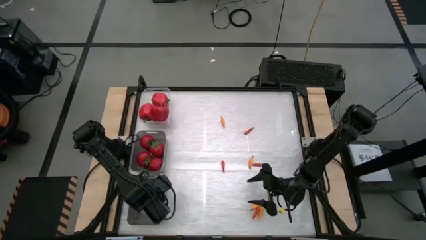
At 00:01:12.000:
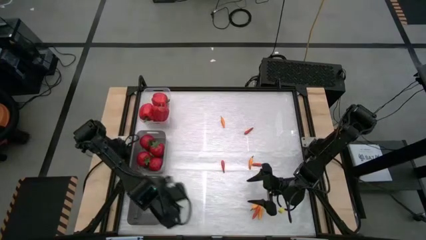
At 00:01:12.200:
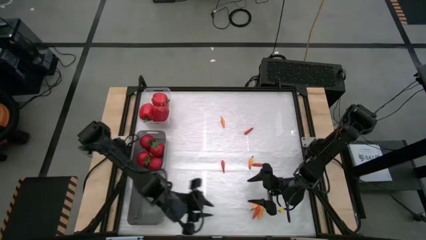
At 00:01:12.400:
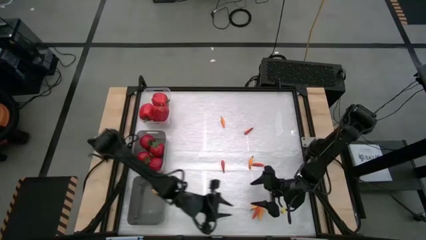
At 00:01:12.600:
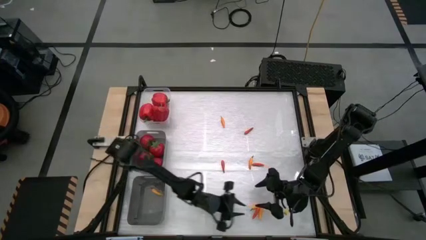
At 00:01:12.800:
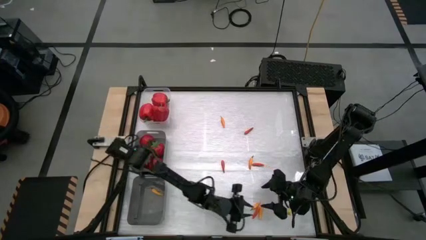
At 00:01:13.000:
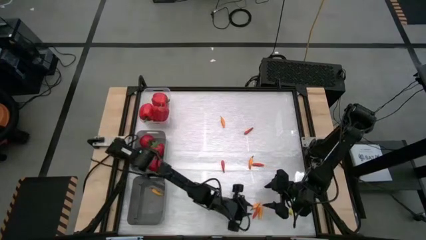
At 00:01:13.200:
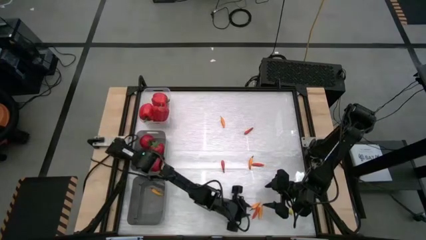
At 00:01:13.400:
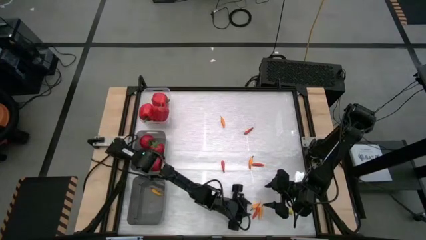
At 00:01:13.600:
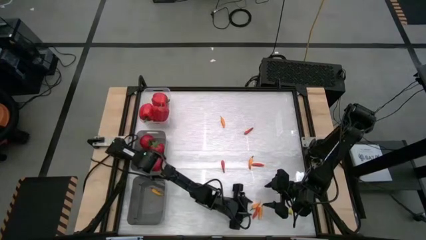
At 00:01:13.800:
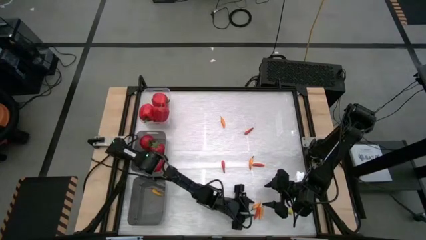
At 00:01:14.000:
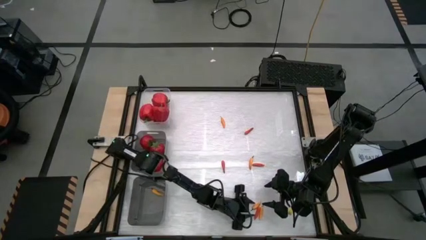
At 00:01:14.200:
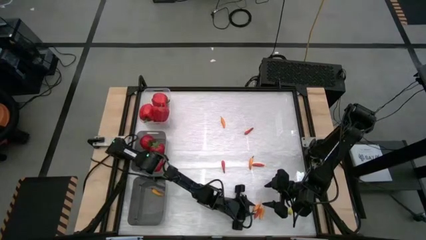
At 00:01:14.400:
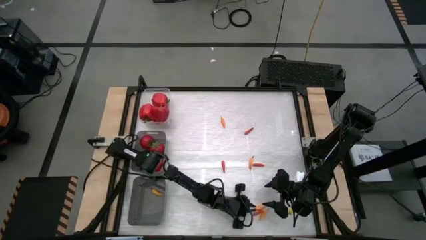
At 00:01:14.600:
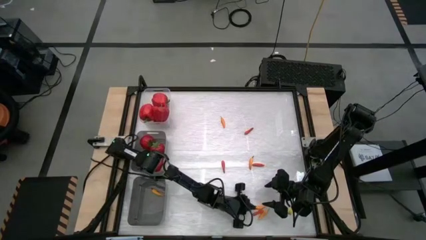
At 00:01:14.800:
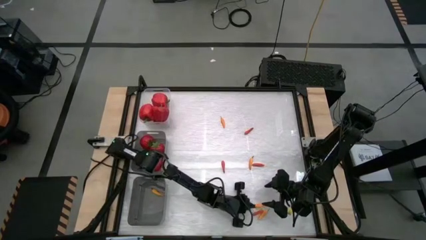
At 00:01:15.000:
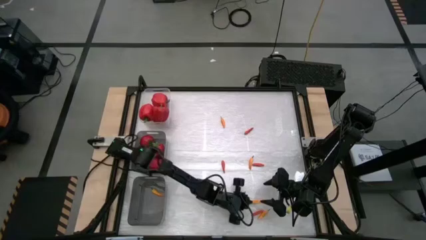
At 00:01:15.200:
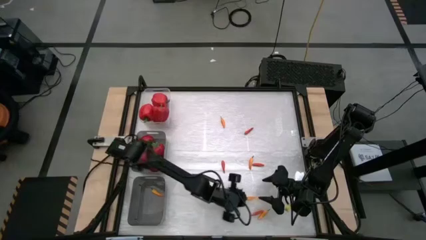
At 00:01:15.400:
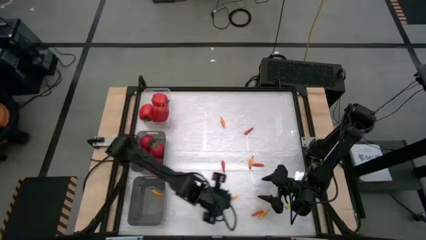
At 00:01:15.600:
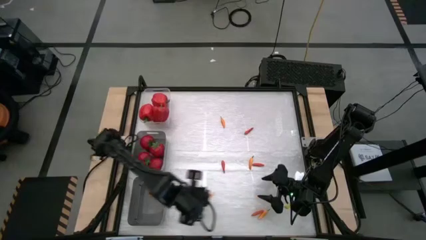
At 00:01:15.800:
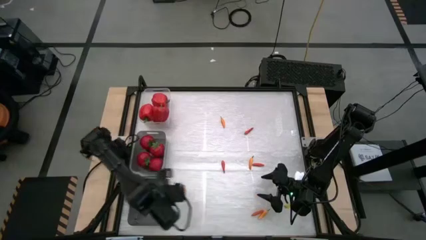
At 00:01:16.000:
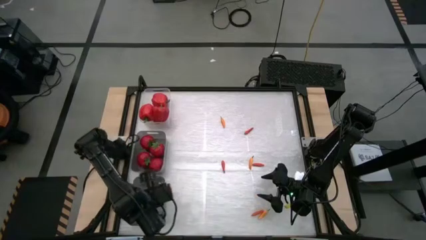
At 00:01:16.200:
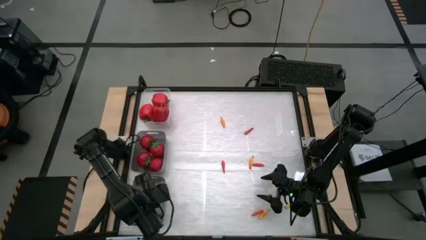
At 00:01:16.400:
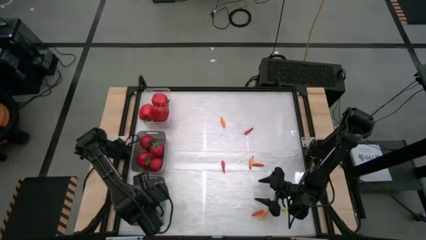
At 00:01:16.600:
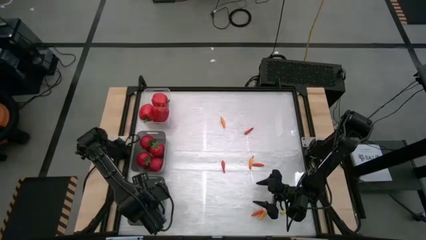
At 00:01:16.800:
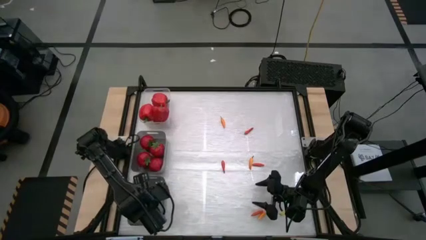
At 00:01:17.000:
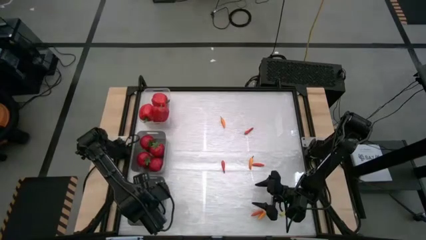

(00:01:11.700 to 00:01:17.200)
Task: Sort produce into baskets
Put the bottom right orange chili pepper into the bottom black transparent bin

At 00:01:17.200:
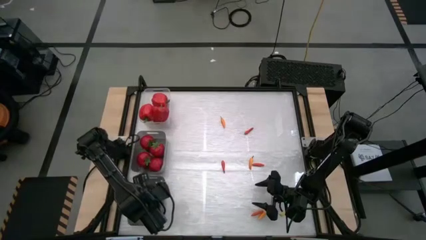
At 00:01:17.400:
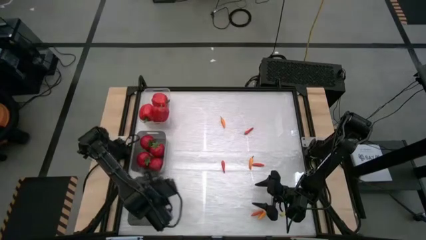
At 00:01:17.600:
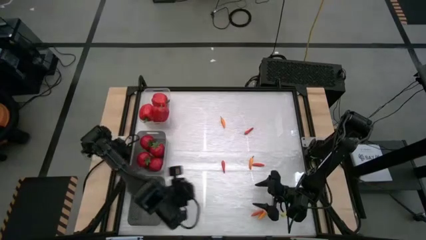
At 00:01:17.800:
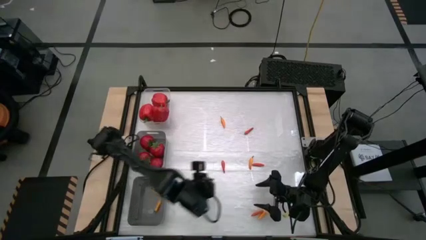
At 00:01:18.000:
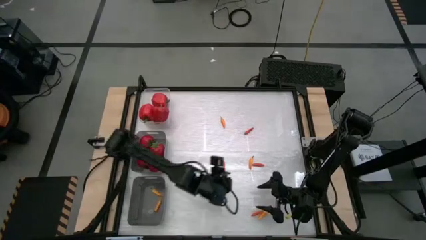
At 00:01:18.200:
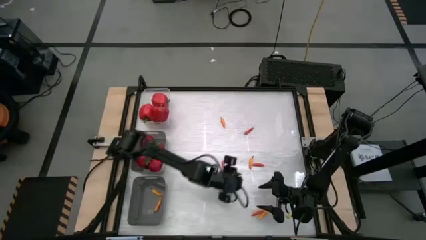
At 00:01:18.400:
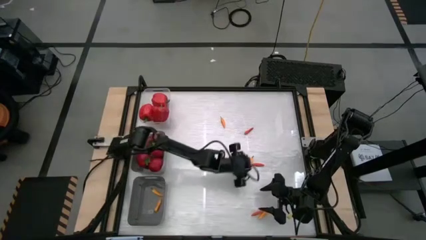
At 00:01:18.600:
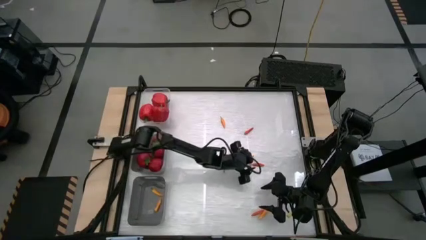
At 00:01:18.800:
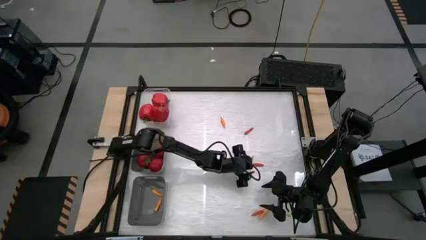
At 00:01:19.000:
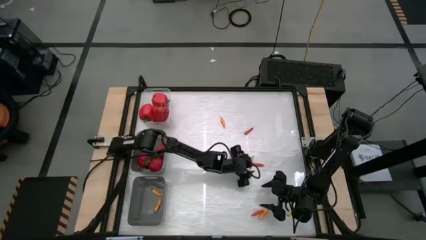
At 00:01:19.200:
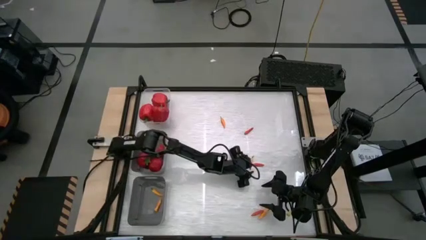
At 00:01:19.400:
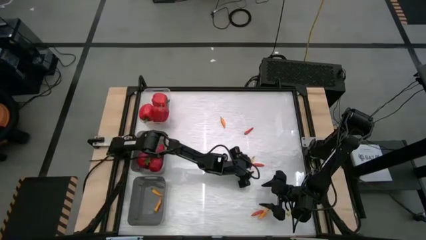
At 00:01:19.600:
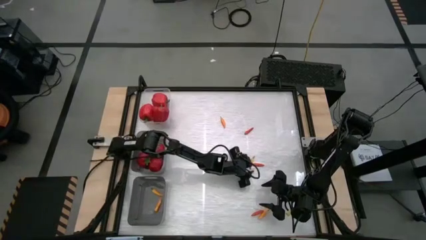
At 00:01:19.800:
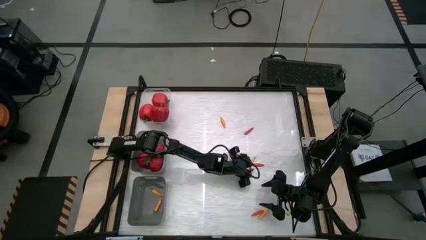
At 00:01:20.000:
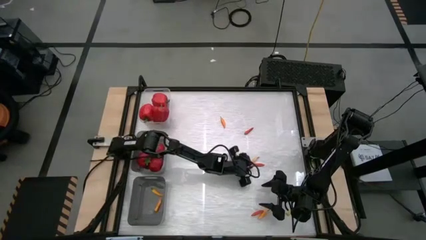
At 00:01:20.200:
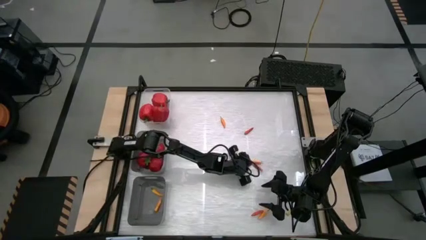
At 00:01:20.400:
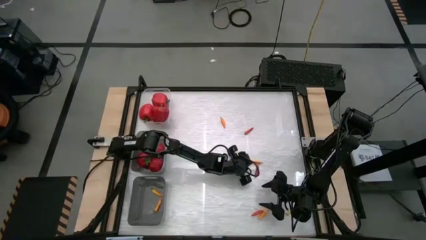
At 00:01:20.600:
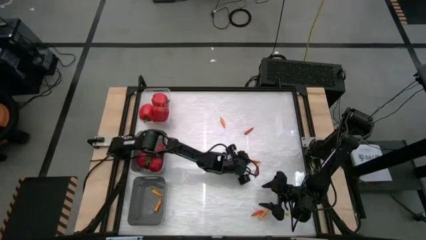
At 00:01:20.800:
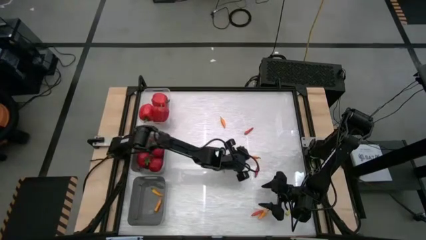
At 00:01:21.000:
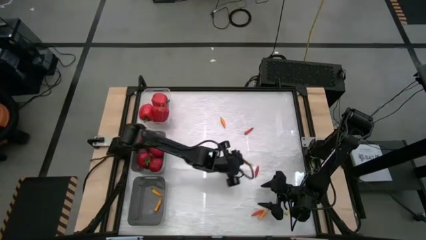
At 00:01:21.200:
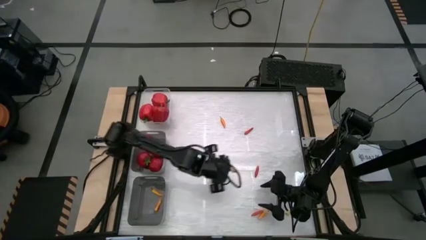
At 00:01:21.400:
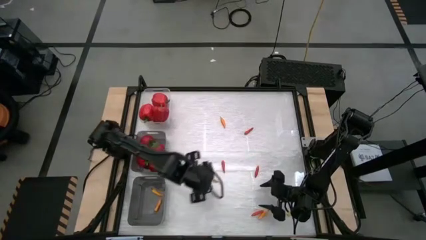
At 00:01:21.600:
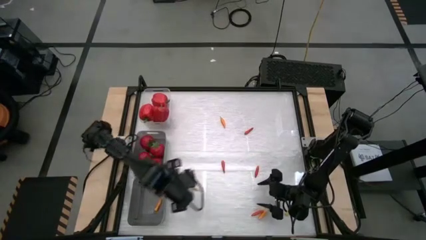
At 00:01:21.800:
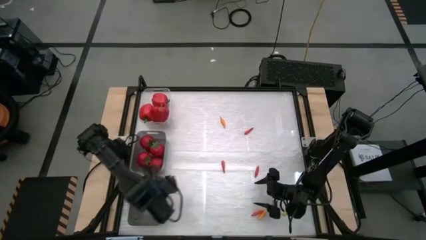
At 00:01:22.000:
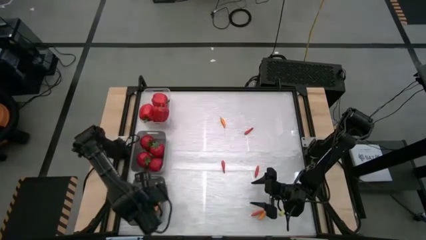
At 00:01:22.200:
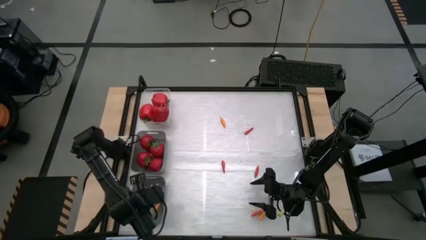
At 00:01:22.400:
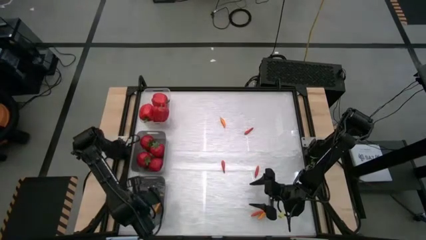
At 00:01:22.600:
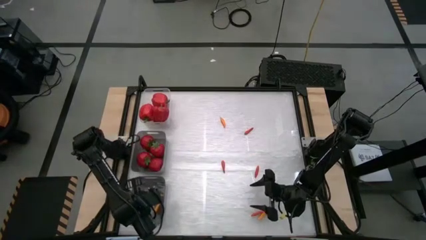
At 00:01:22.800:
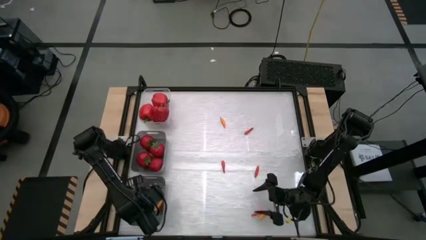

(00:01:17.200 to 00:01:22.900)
Put the middle right orange chili pepper into the bottom black transparent bin

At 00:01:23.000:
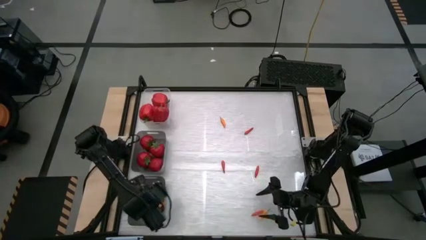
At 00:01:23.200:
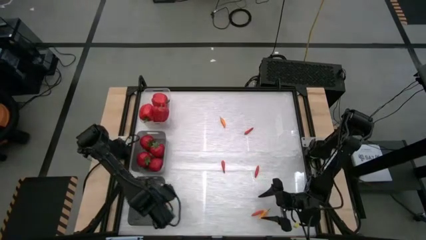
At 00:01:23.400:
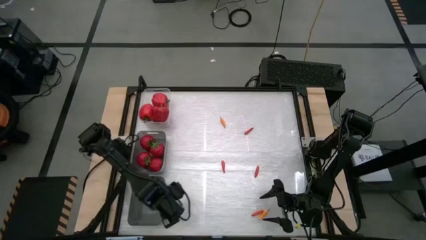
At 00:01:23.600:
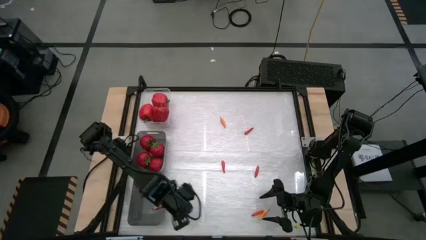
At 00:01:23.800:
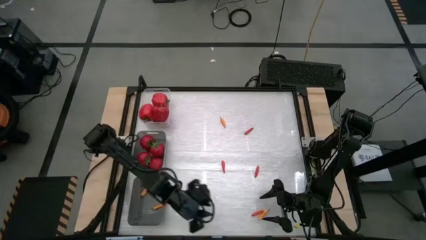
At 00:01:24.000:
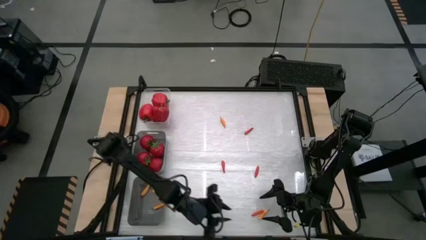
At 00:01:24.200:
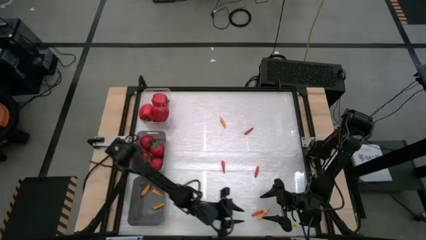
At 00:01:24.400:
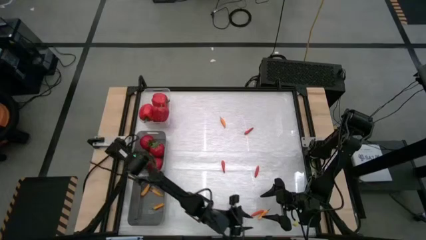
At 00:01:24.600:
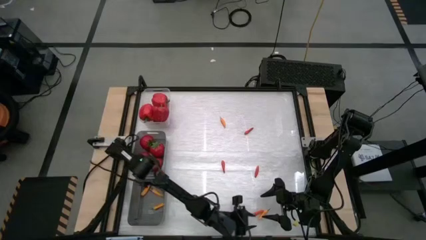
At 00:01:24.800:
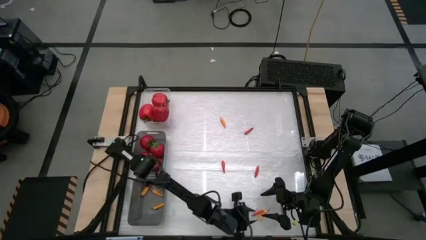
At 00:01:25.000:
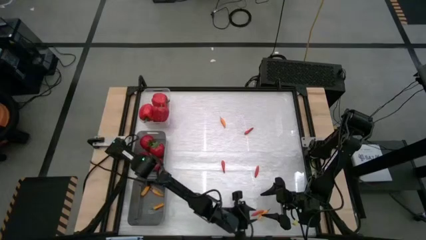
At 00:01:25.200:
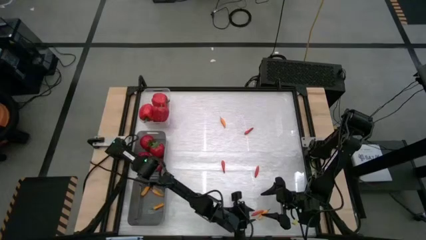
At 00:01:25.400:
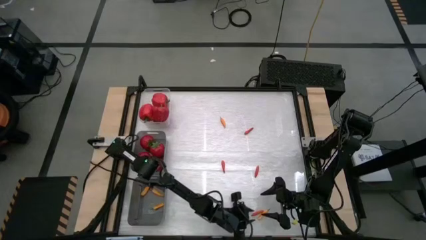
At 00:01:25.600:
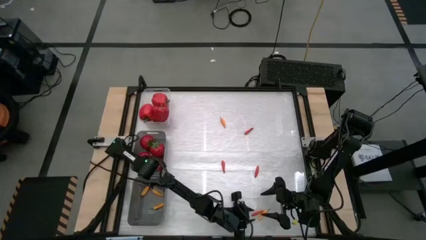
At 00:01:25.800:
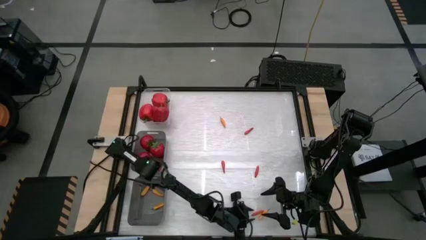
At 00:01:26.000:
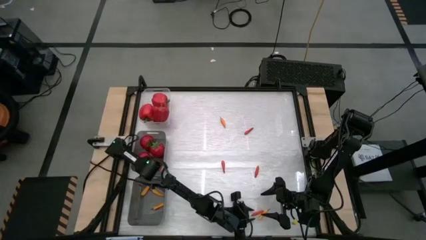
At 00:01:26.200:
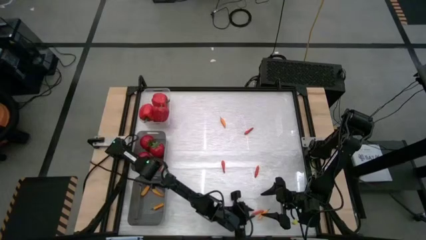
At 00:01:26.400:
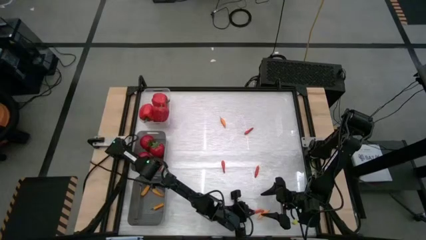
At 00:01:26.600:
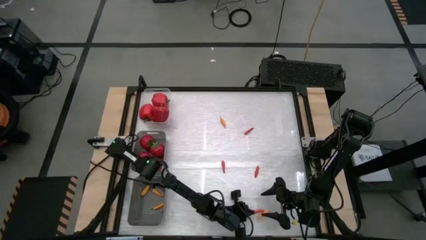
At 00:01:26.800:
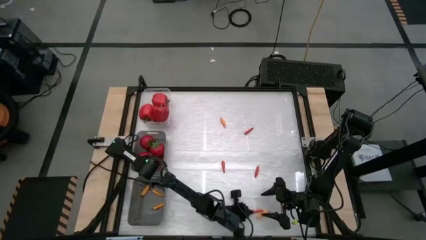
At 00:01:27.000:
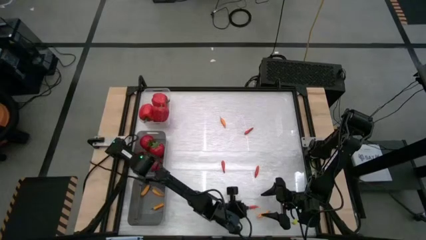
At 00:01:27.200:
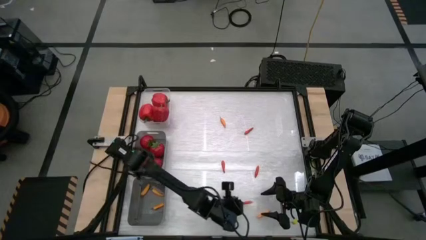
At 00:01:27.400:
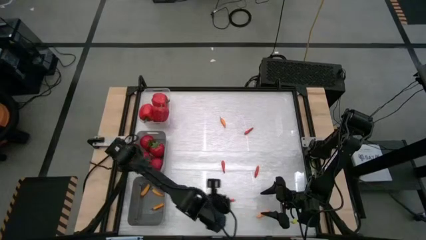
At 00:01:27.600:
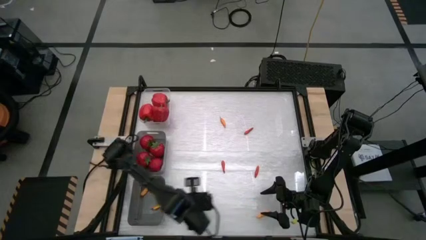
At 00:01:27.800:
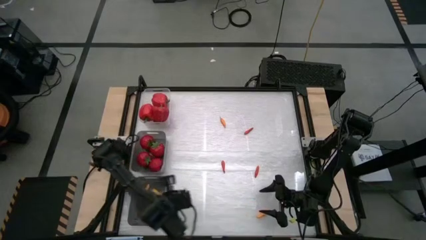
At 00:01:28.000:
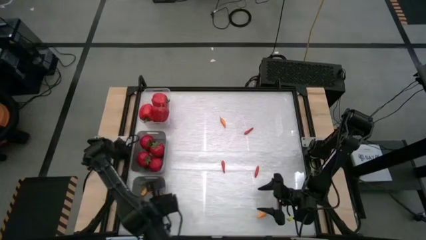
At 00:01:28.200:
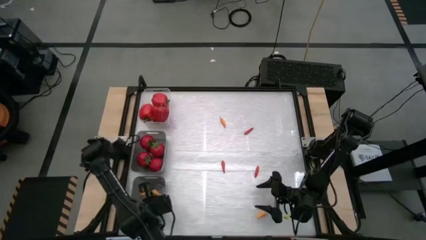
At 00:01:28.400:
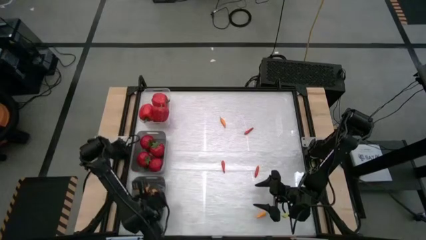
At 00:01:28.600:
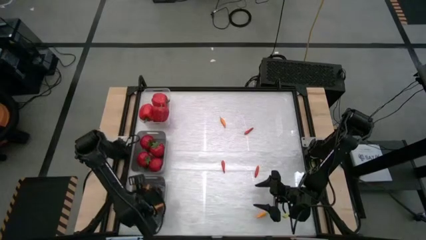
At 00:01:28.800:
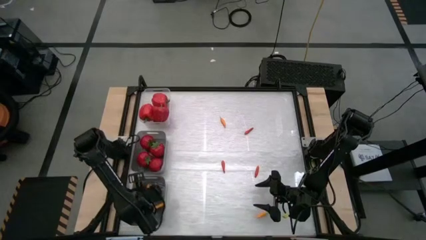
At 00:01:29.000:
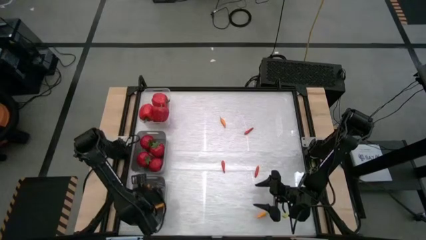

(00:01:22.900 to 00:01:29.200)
Put the bottom center red chili pepper into the bottom black transparent bin
